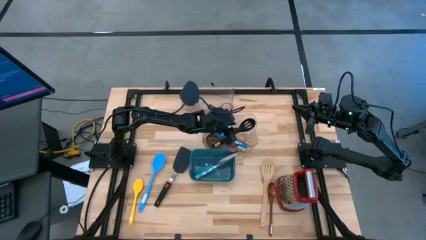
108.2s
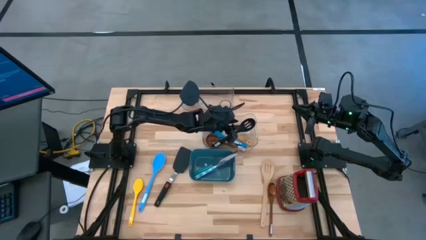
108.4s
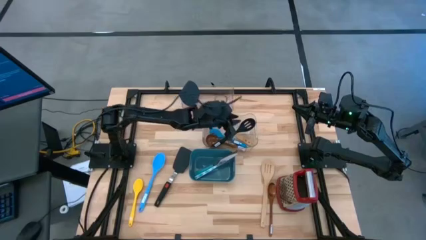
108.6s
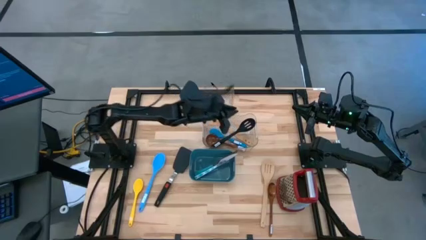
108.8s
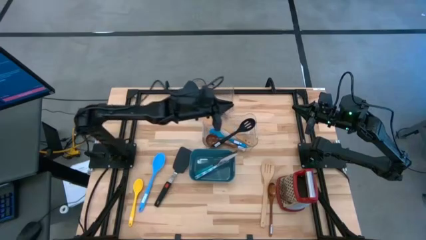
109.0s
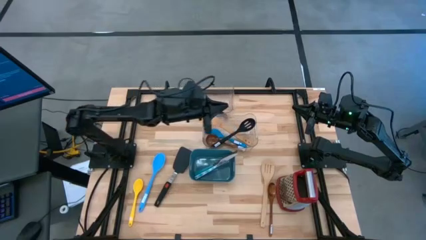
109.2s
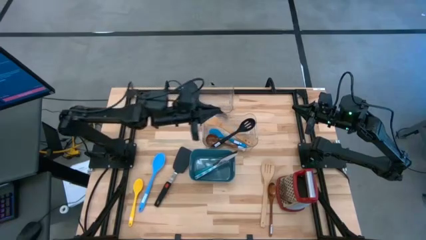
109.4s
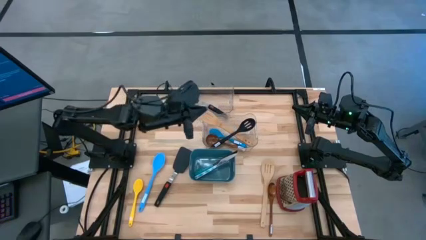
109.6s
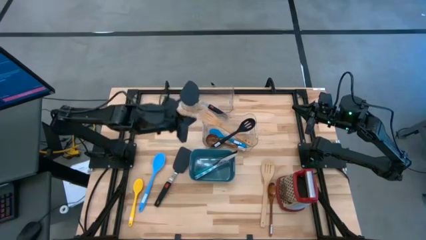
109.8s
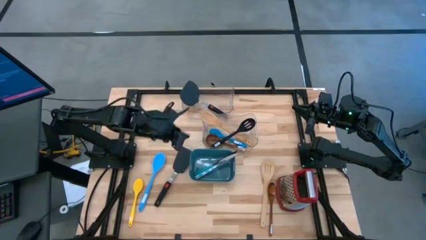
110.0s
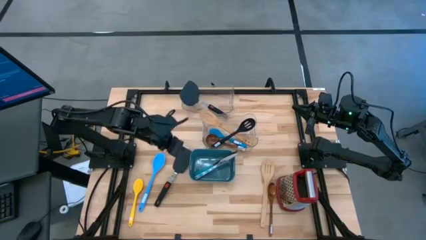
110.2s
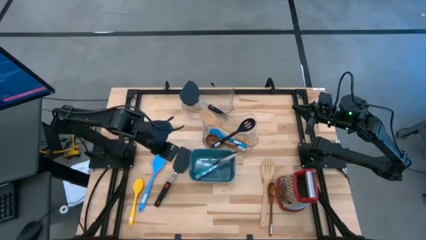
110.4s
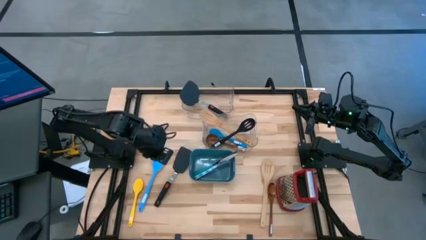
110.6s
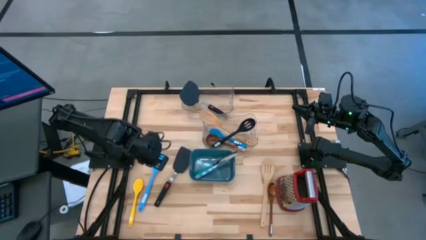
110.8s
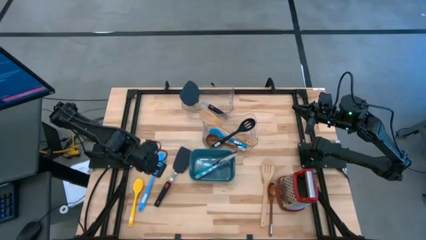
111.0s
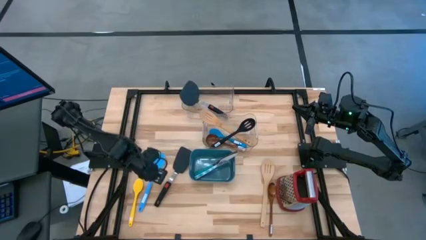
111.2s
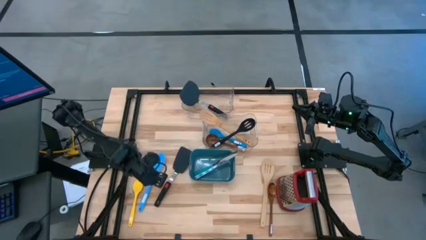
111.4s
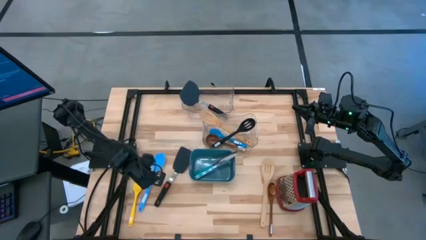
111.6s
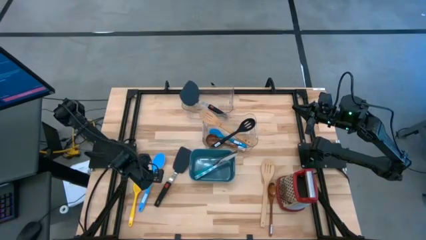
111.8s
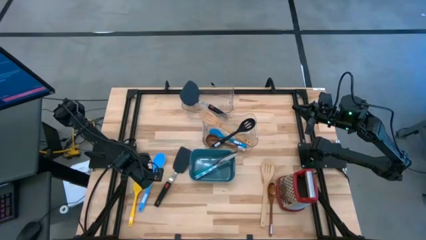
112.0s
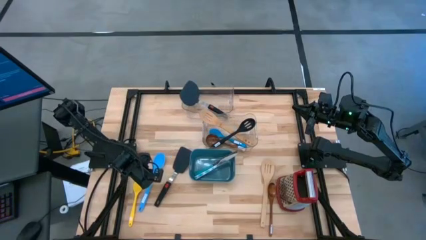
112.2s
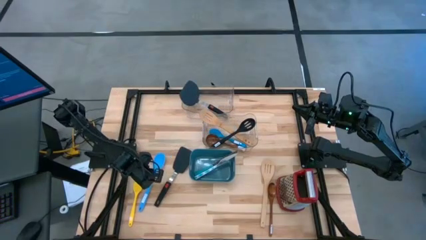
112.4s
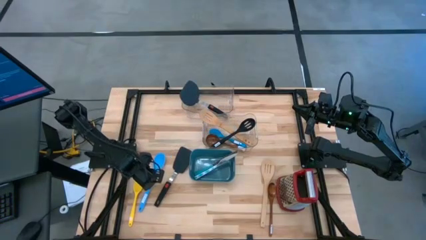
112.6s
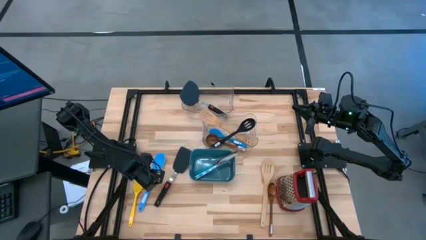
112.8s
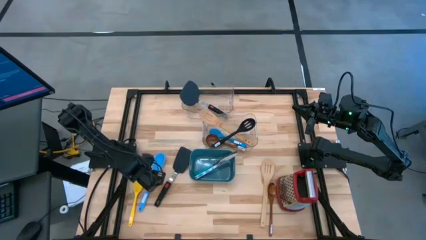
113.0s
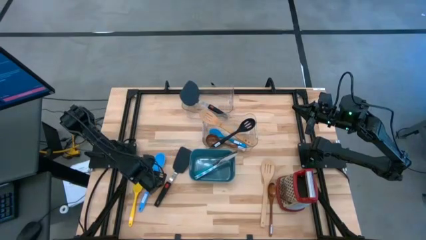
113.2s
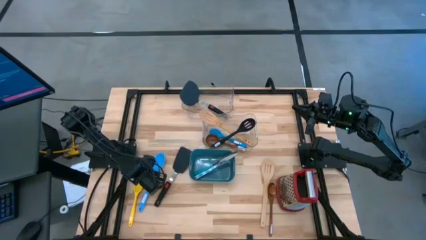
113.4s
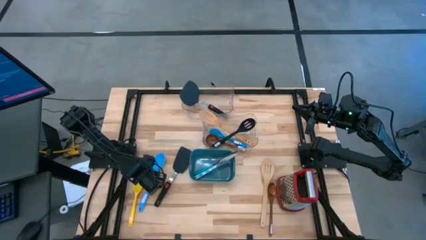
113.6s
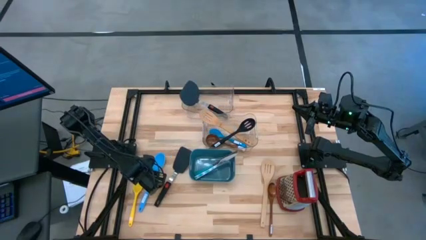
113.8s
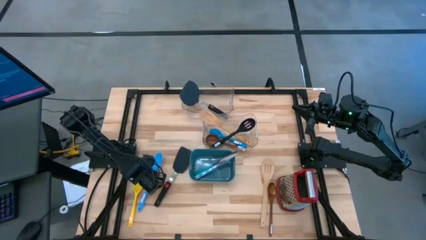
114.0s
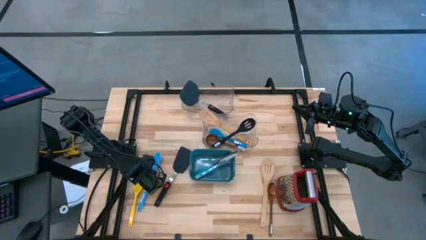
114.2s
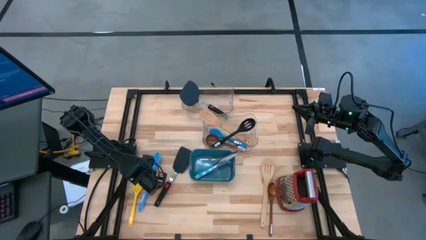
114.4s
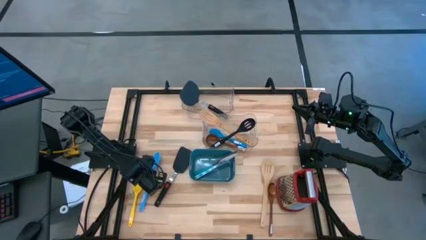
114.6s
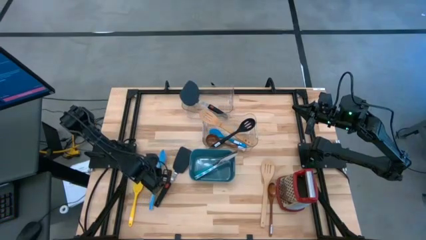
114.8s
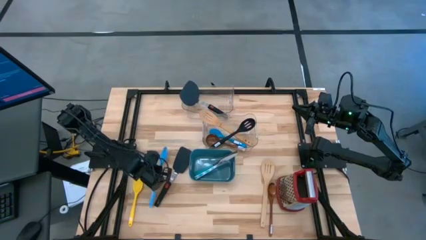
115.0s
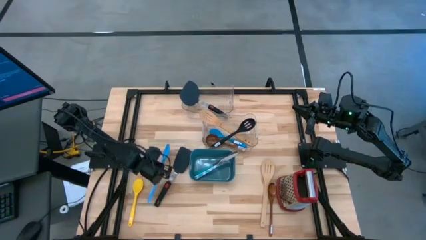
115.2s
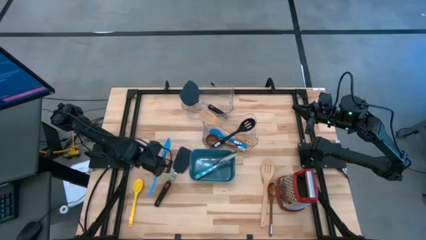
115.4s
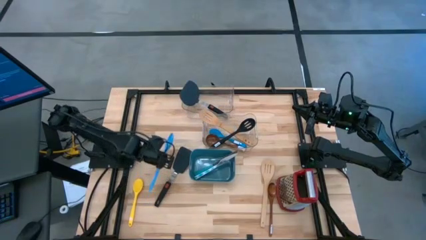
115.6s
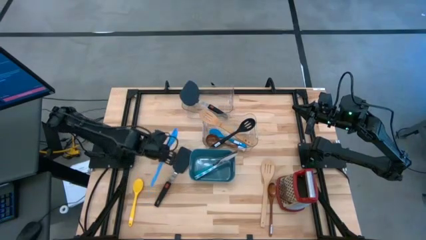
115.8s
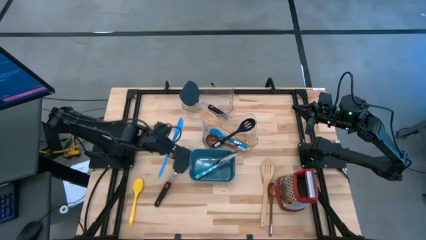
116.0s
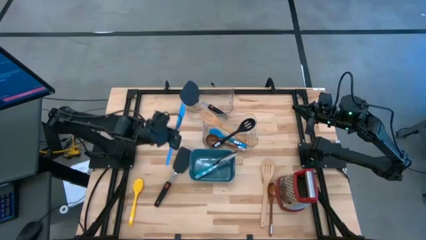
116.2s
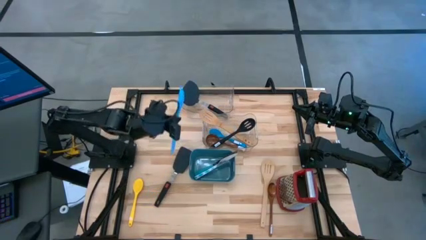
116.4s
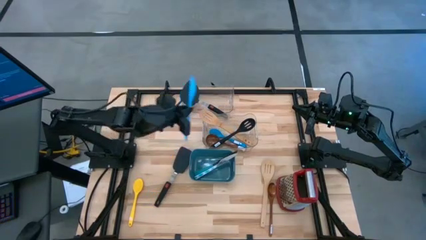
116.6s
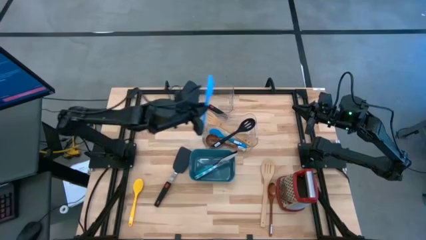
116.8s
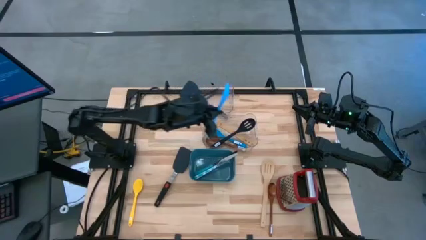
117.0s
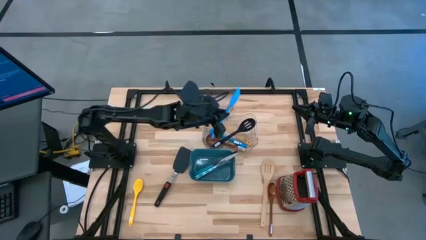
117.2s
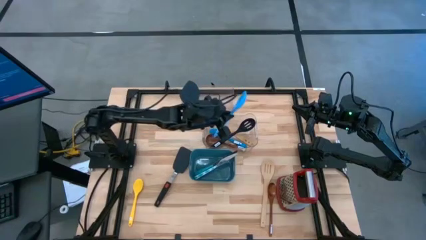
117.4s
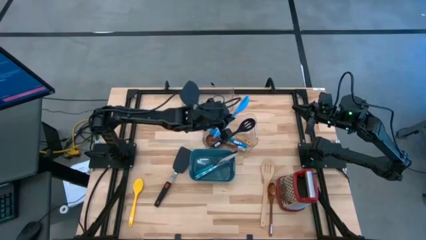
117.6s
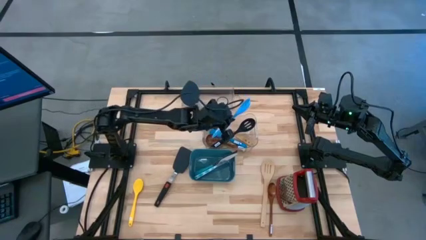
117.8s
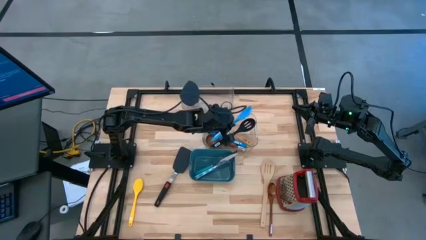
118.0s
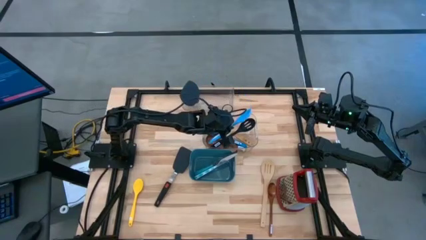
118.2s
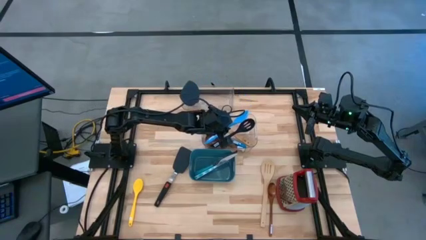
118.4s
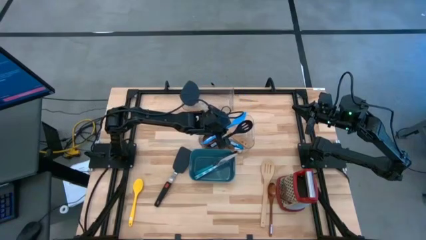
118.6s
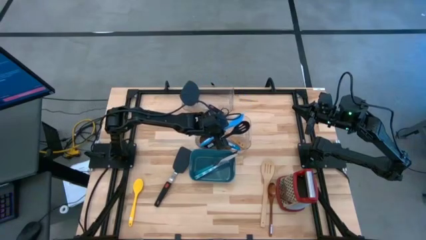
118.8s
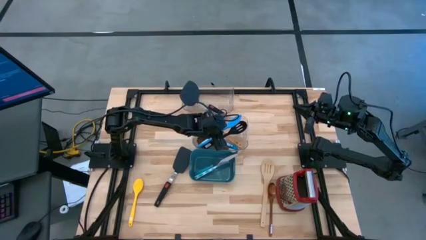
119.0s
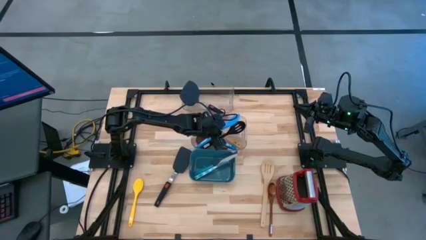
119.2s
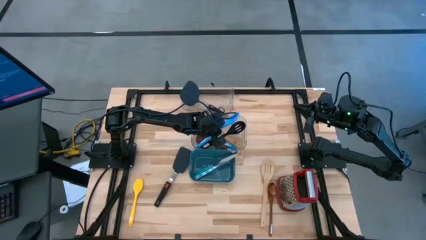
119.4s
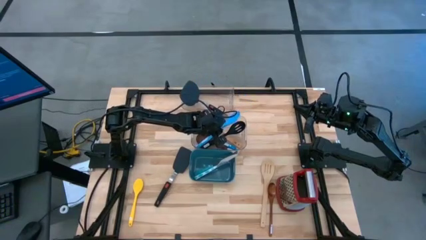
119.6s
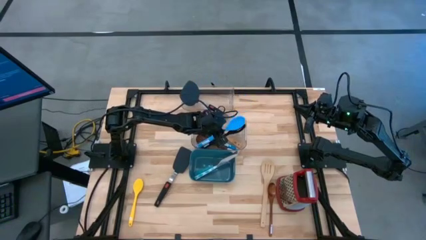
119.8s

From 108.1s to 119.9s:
Task: Pick & Place Kitchen Items
Put the blue serving spoon into the bottom transparent bin

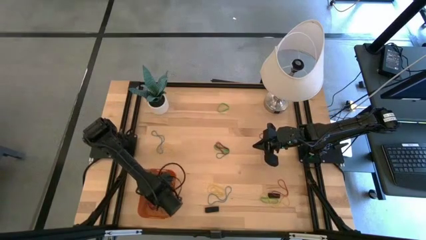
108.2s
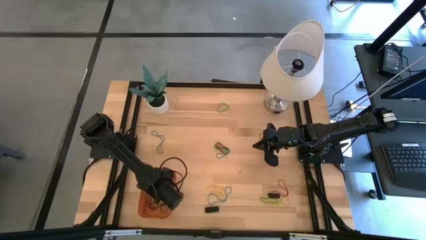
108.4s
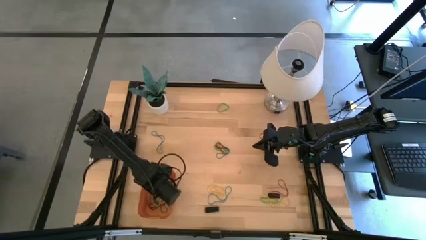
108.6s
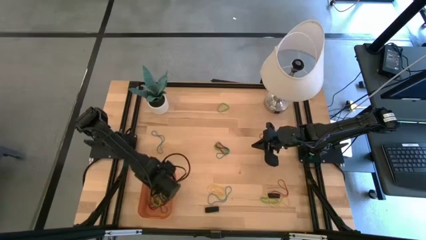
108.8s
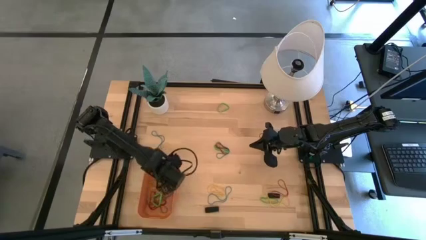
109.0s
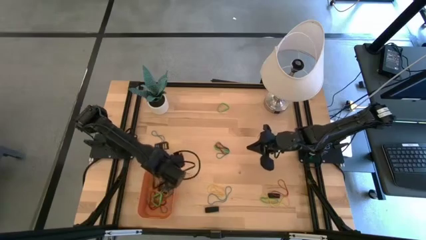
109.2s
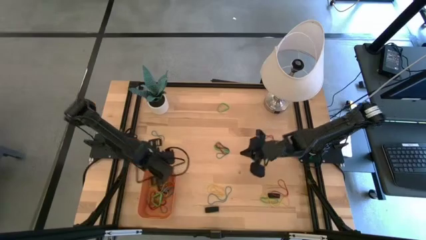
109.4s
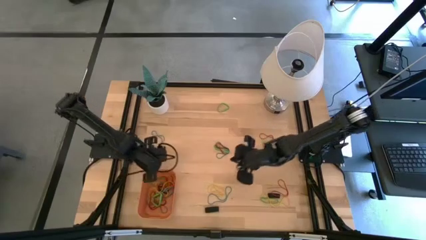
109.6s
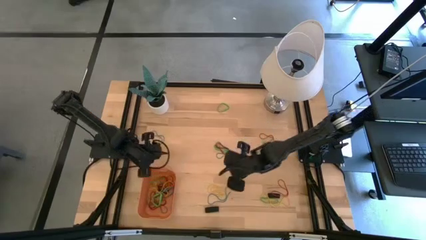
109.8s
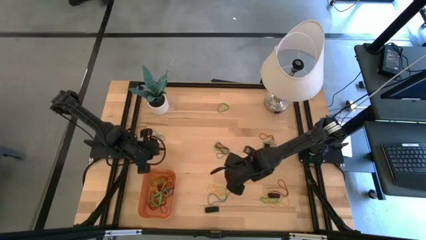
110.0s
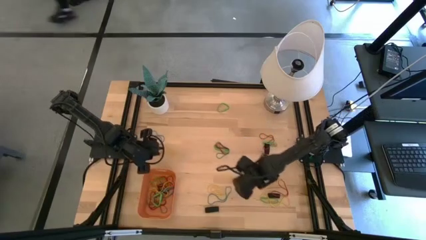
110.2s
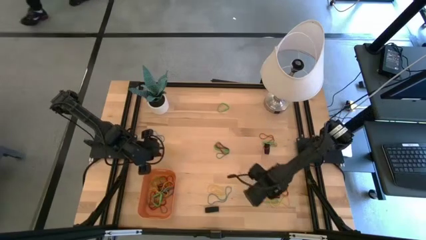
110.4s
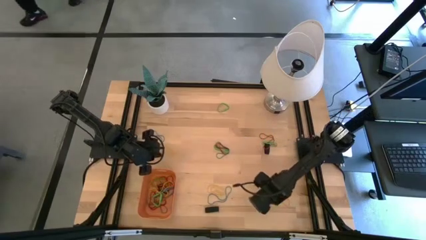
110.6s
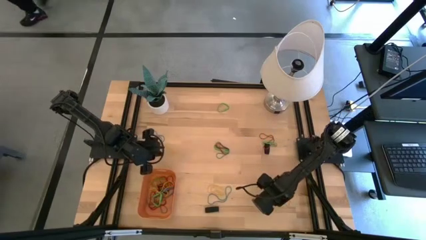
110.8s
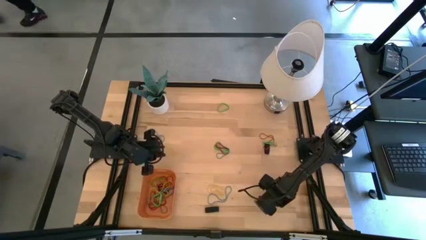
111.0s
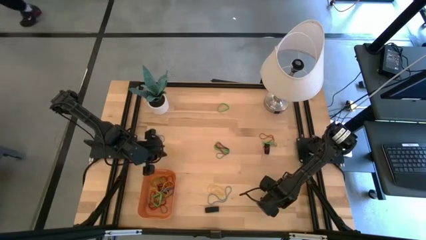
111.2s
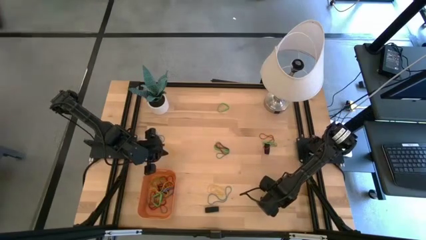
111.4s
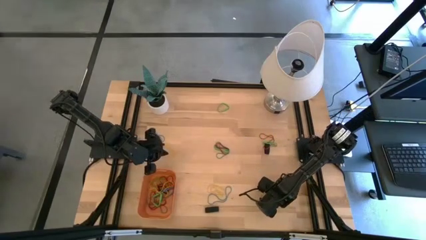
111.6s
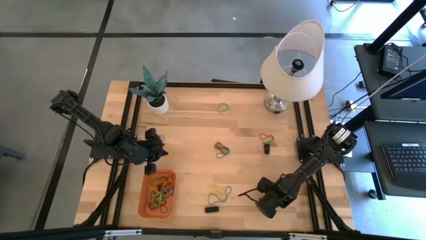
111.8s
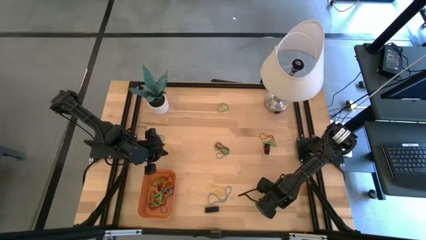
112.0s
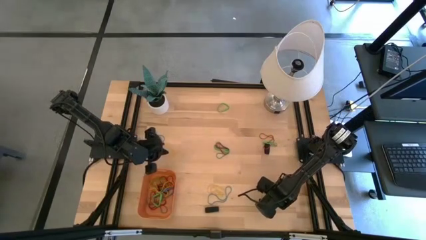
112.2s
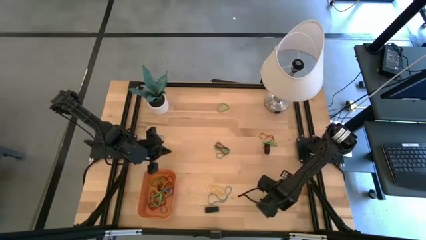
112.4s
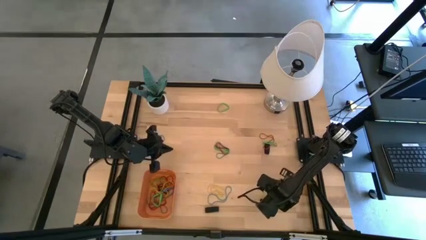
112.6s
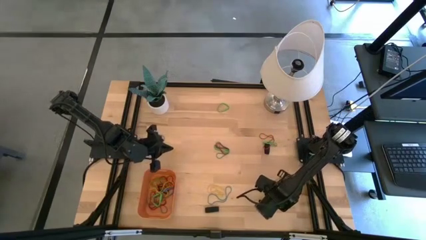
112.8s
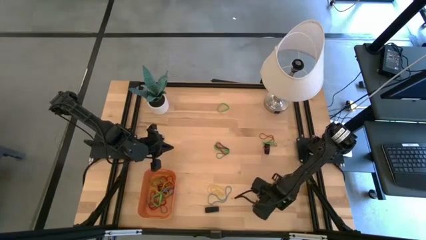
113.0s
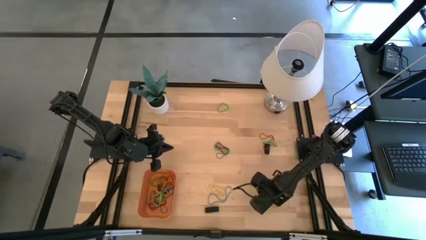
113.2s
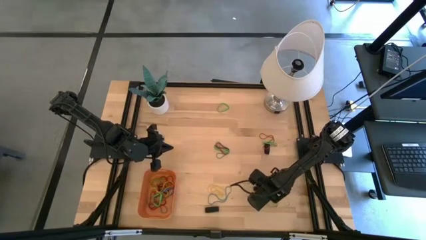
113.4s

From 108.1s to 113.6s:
Task: Pick and place rubber bands into bin
Put the black rubber band into the orange bin
